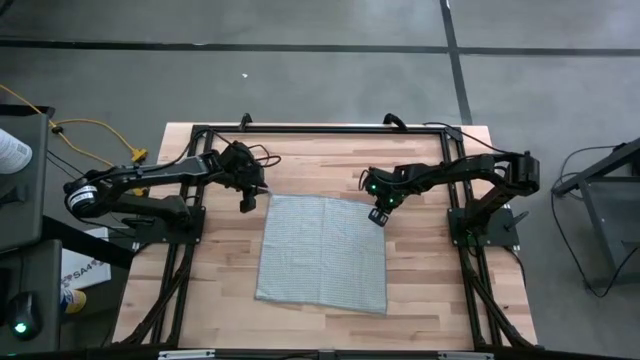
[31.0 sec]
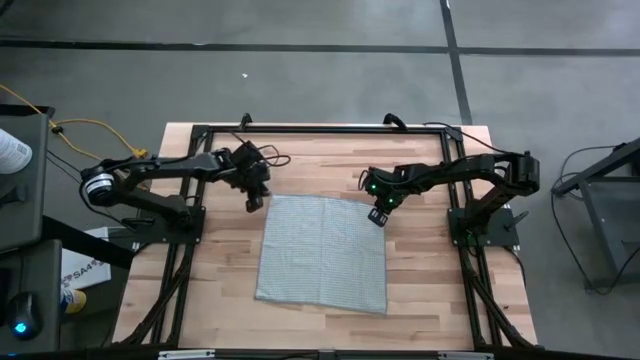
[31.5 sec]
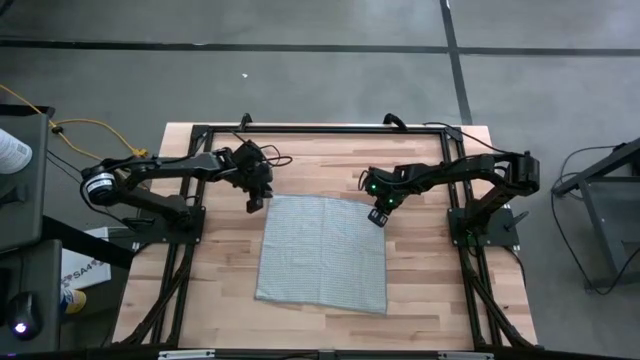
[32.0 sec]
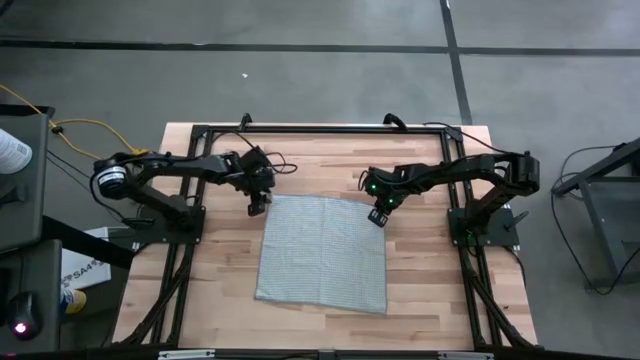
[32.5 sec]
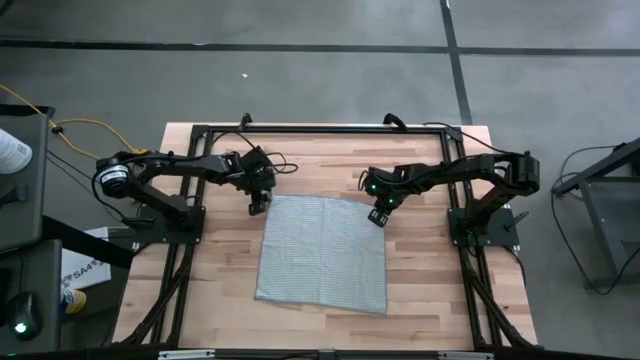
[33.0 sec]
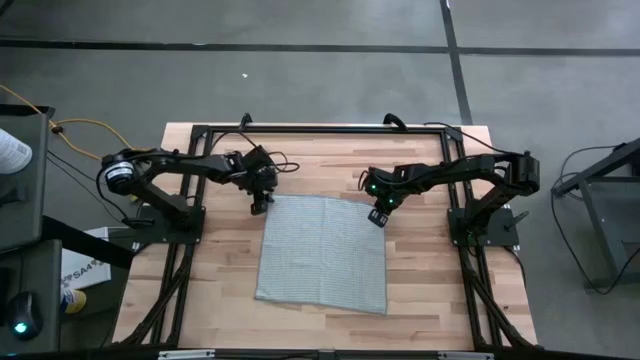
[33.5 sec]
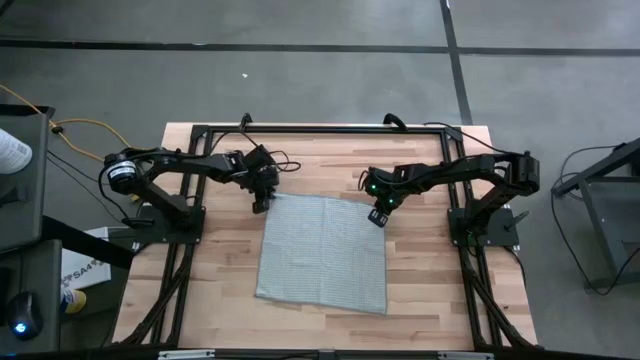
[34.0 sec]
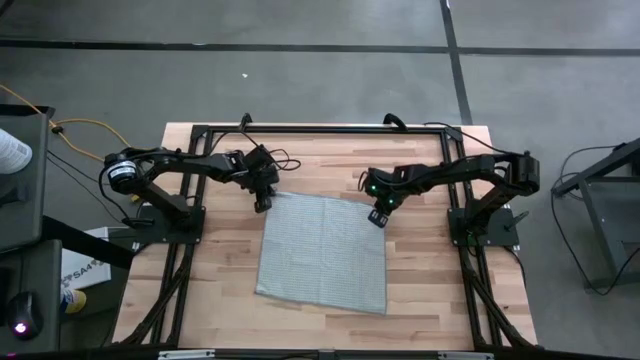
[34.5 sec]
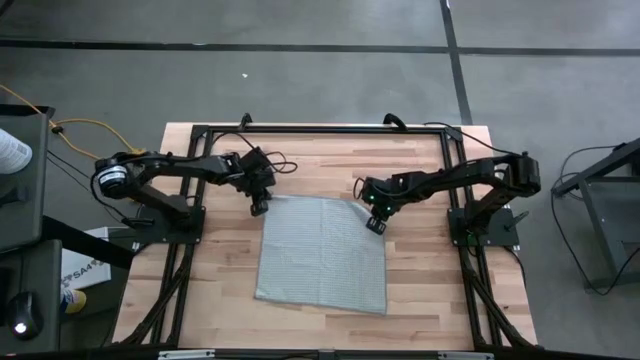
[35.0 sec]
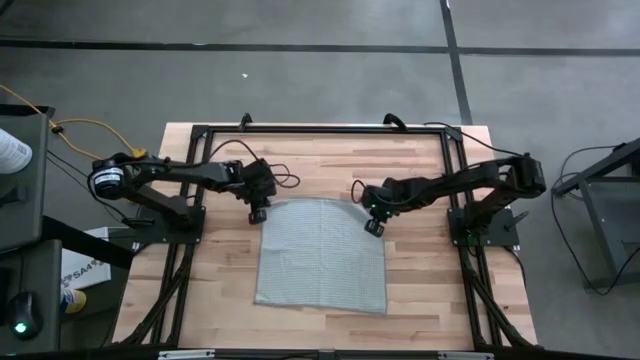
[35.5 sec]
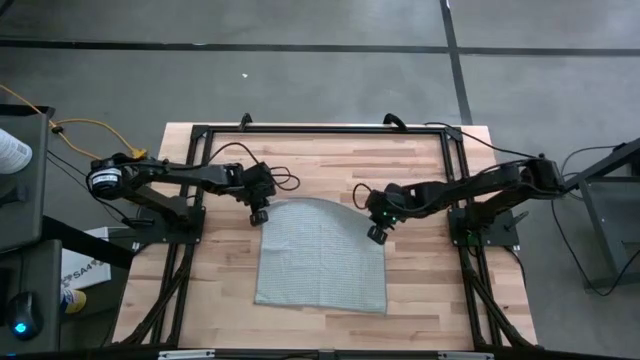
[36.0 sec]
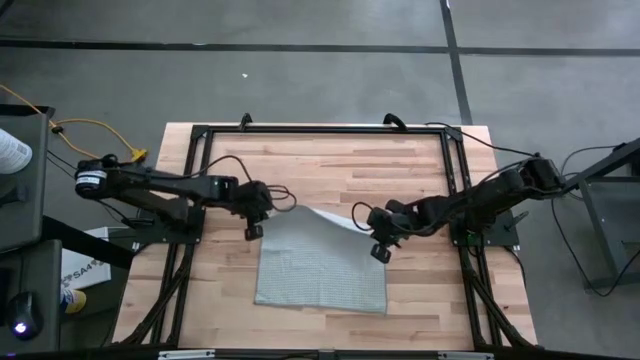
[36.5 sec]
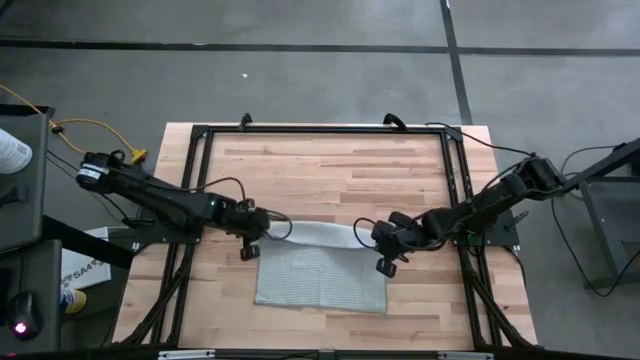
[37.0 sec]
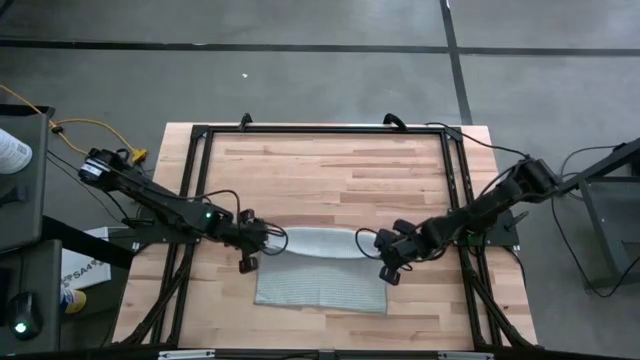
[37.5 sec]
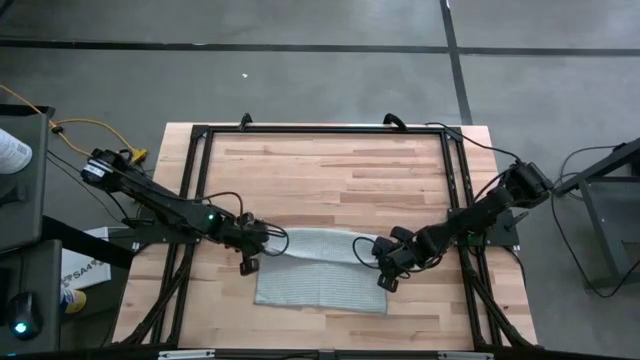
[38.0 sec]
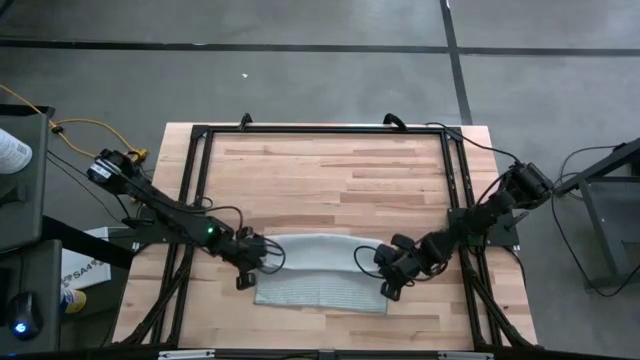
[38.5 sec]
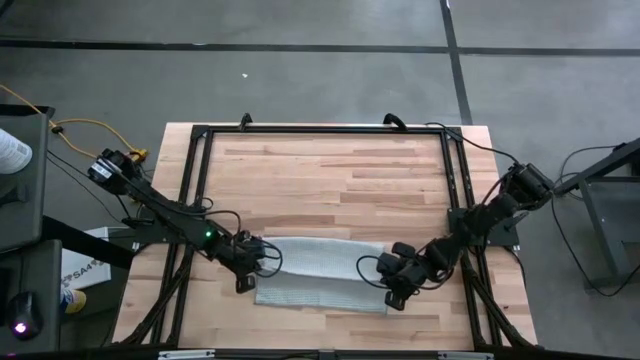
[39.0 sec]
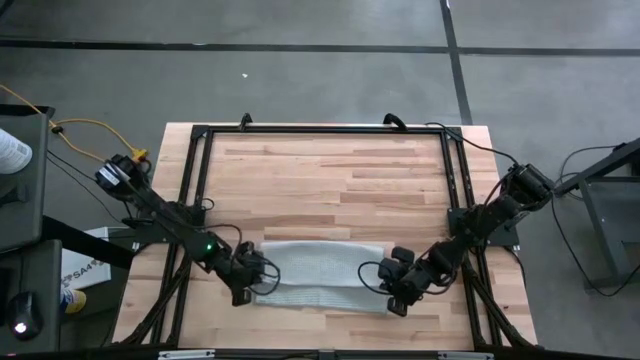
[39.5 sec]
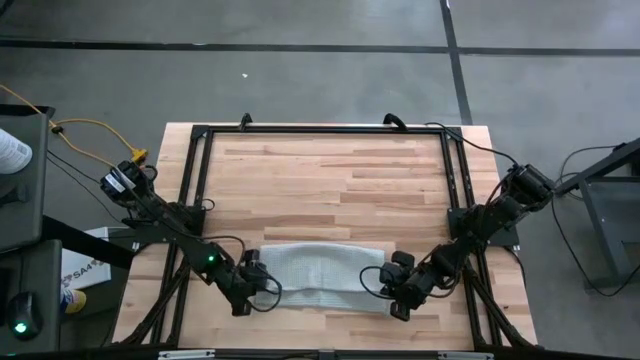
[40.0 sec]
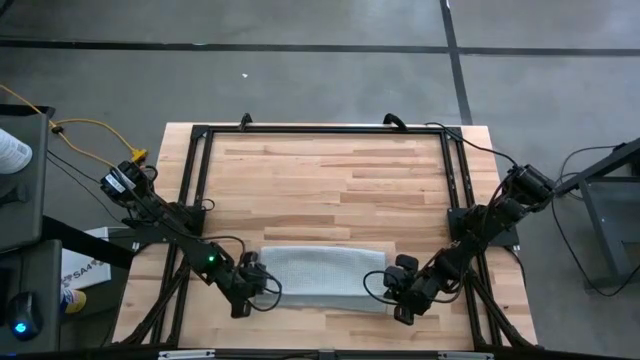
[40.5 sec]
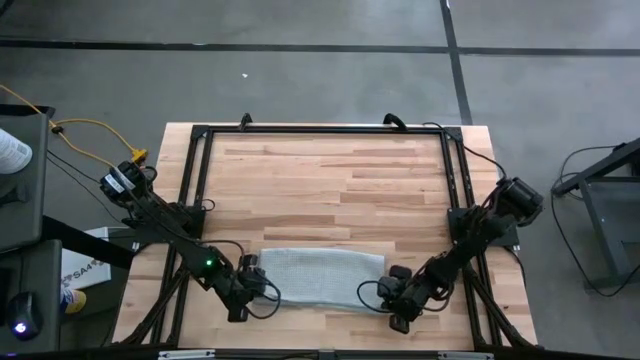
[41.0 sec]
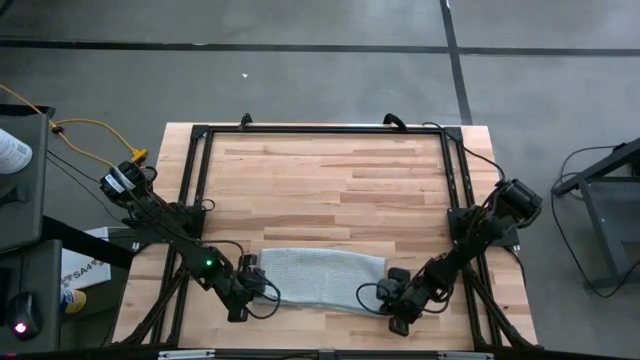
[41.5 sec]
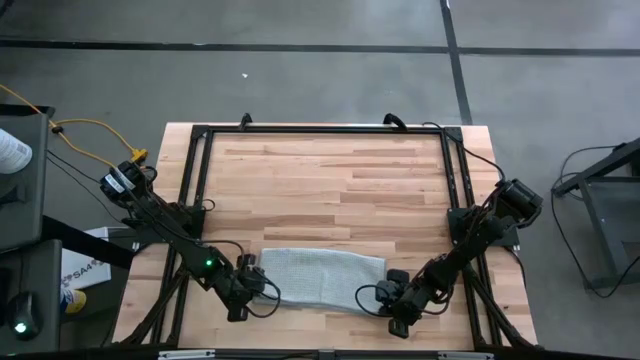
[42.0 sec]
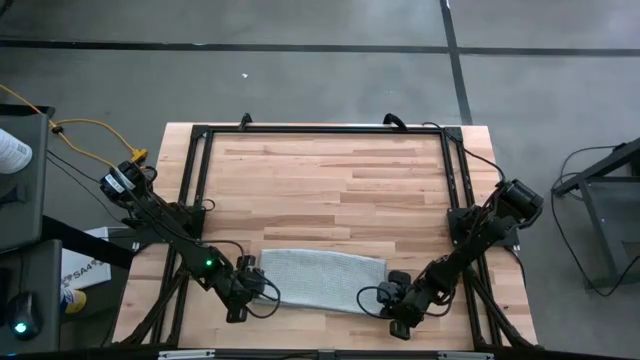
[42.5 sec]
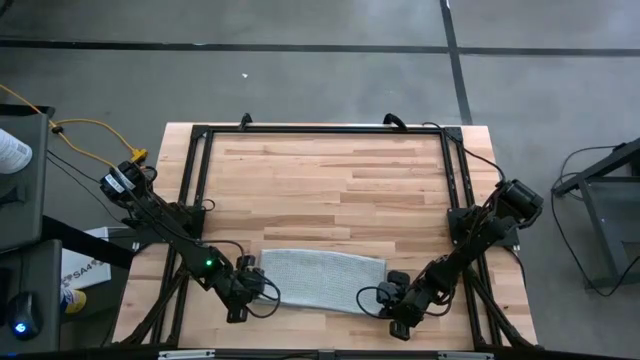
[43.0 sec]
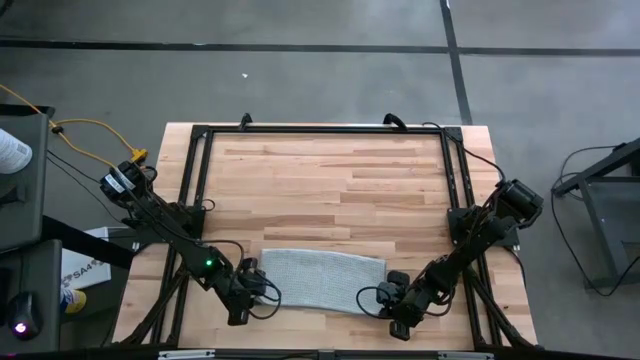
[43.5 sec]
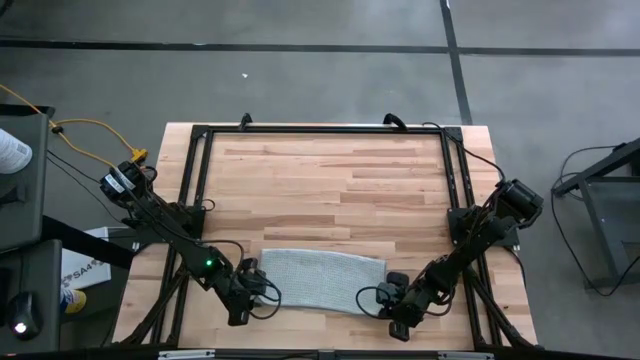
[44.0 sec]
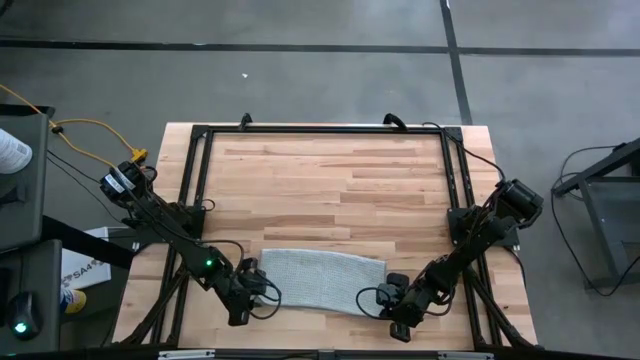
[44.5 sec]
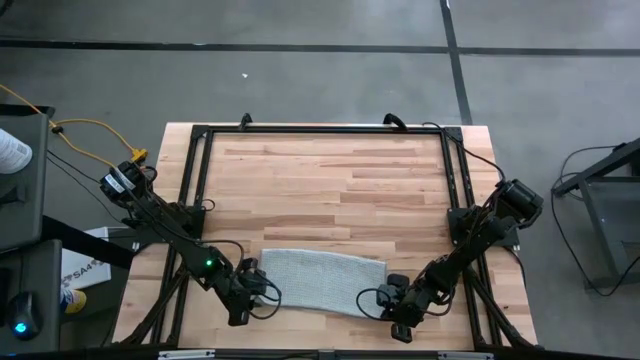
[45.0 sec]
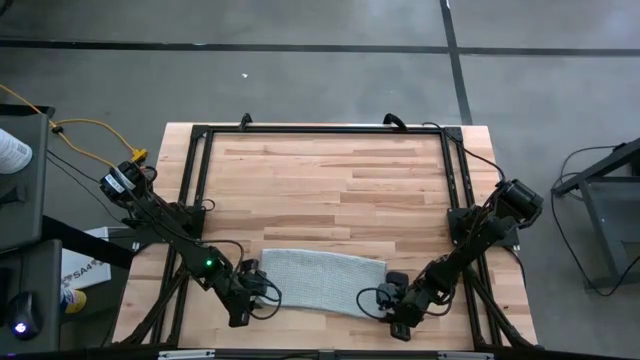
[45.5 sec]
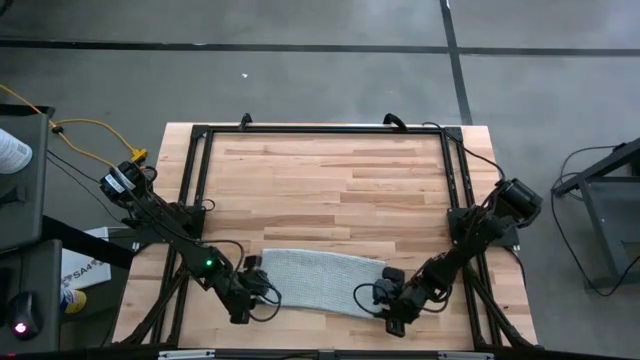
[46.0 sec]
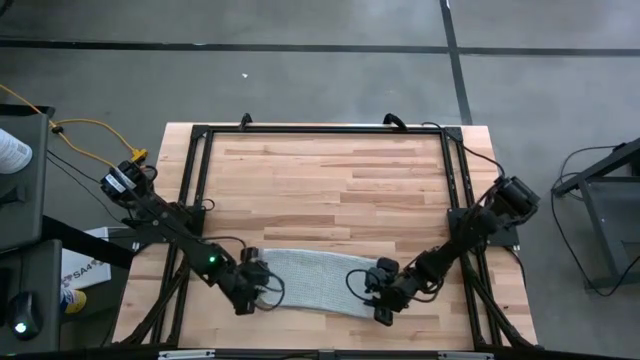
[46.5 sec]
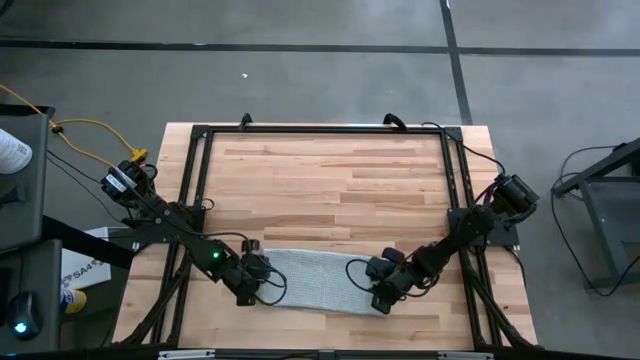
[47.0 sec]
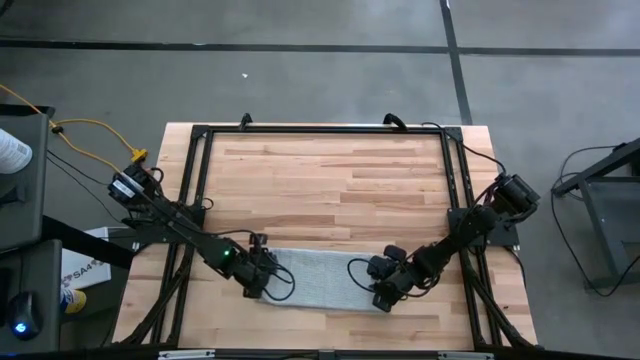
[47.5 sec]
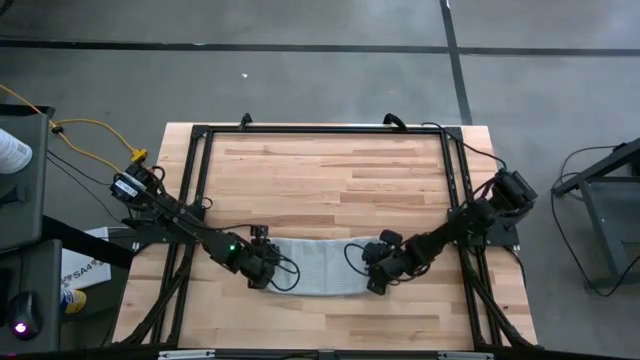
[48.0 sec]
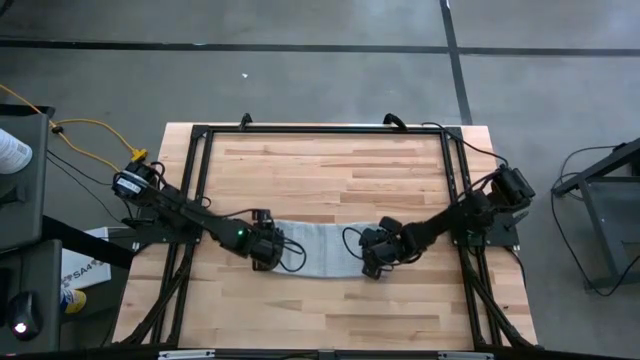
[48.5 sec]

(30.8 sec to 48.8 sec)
Task: Fold microfiber towels
Fold the gray microfiber cloth

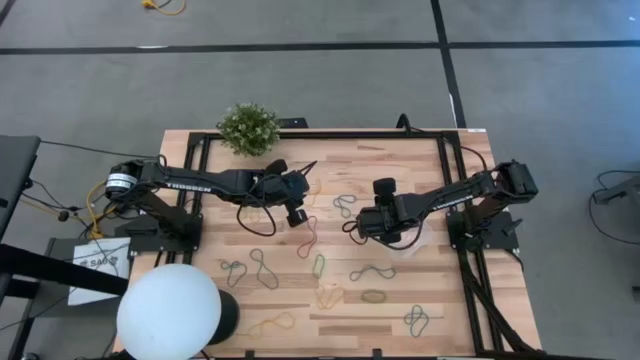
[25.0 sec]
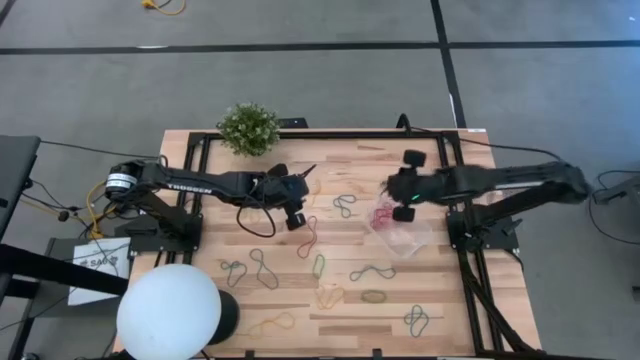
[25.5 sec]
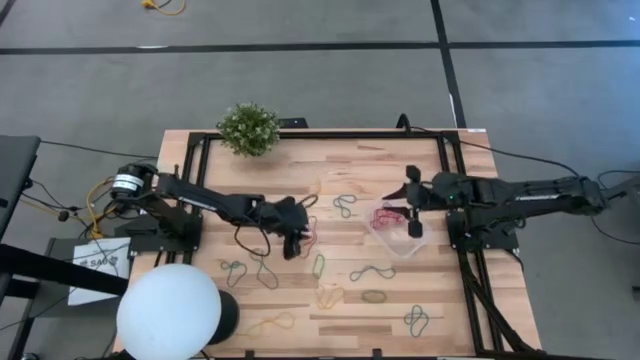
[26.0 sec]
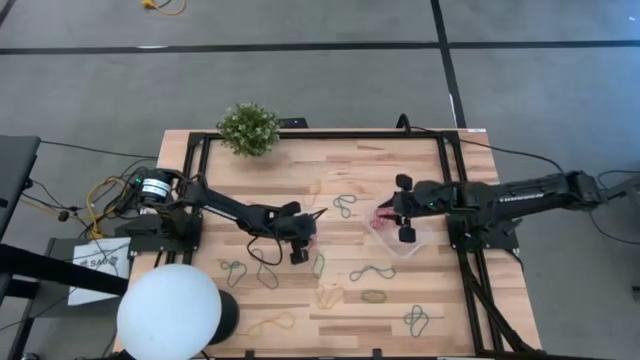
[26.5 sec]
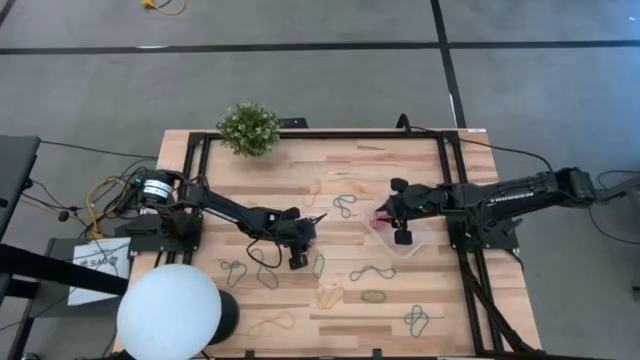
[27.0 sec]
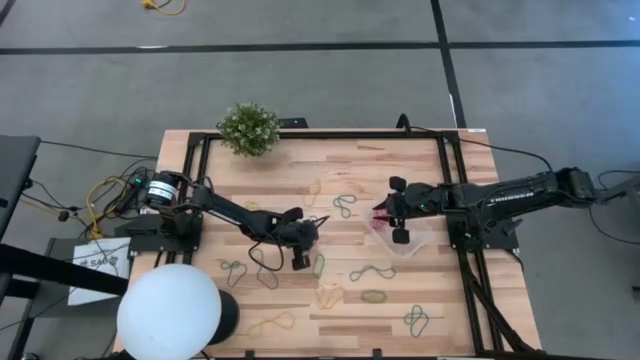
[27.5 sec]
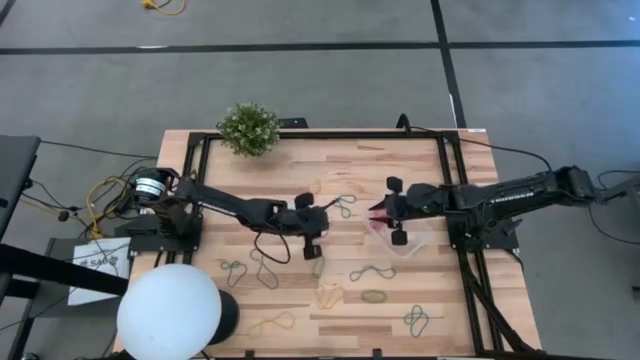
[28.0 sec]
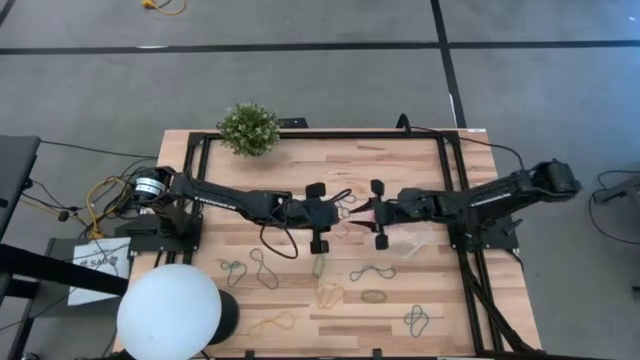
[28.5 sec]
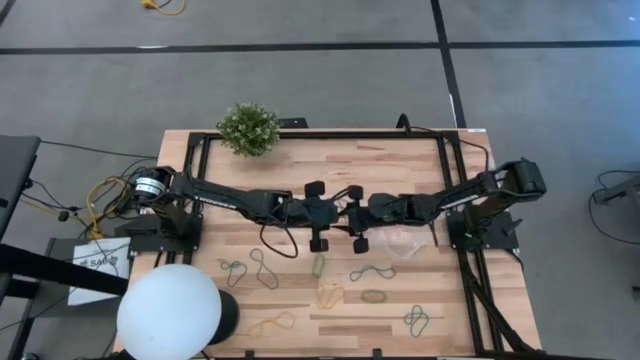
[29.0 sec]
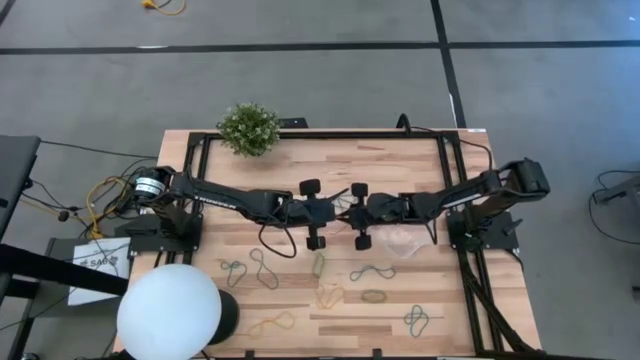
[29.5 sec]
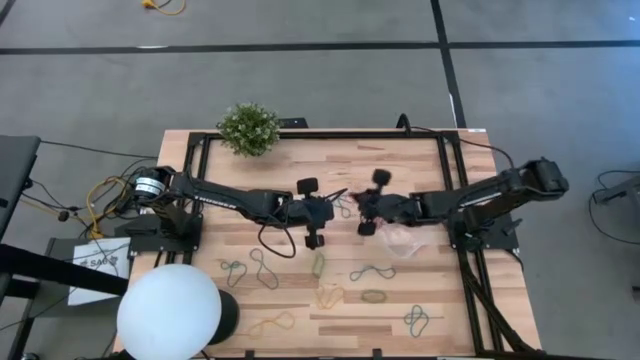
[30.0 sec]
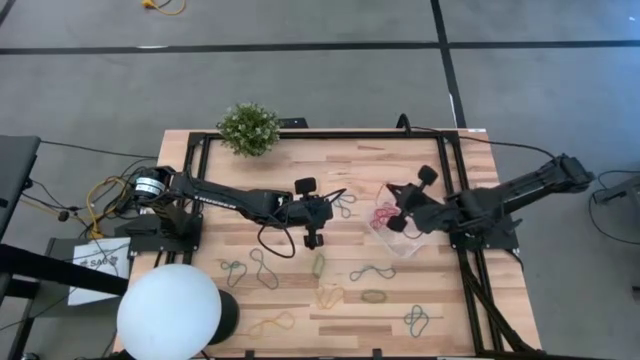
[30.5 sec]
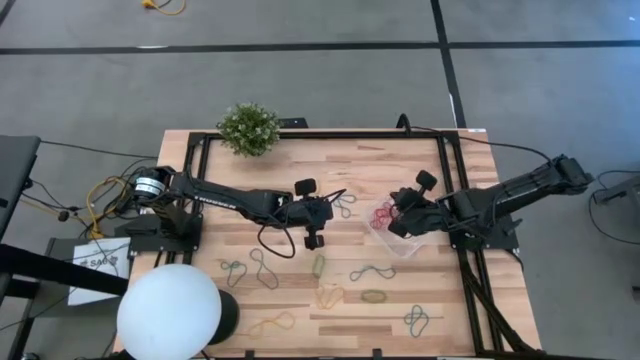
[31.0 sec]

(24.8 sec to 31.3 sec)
Task: Pick and place items into bin
Put the red rubber band into the transparent bin
